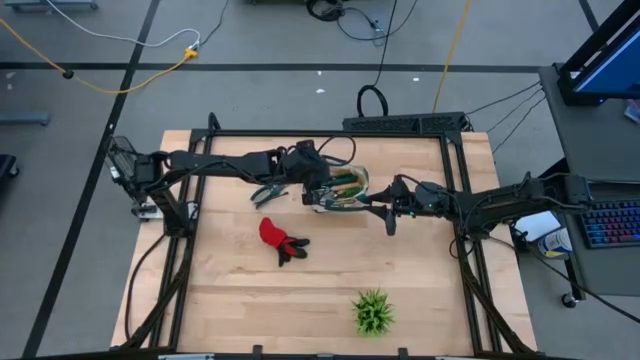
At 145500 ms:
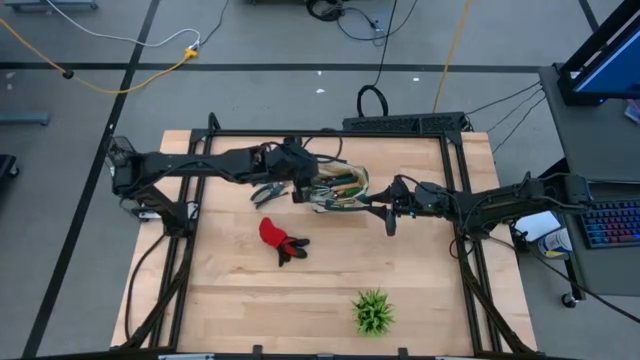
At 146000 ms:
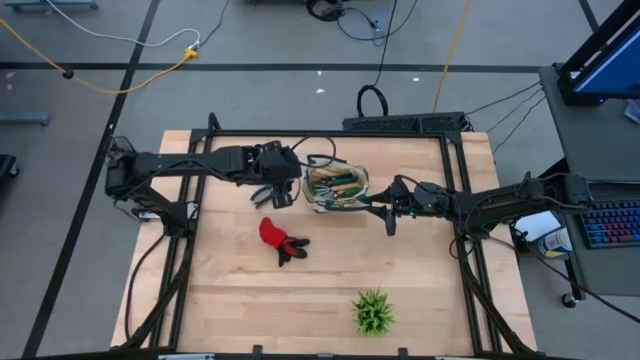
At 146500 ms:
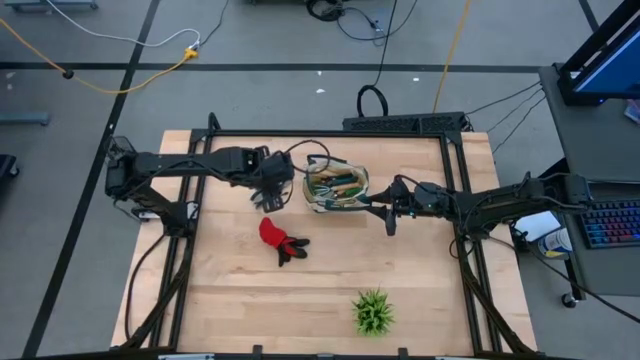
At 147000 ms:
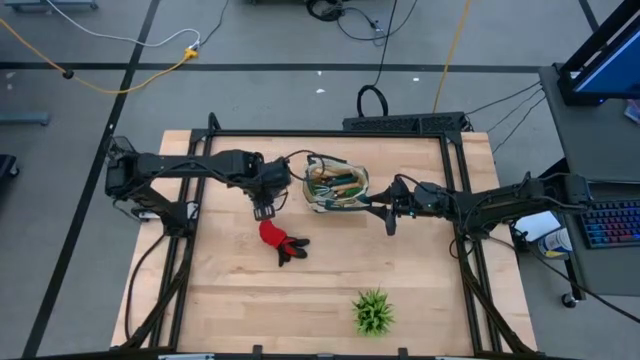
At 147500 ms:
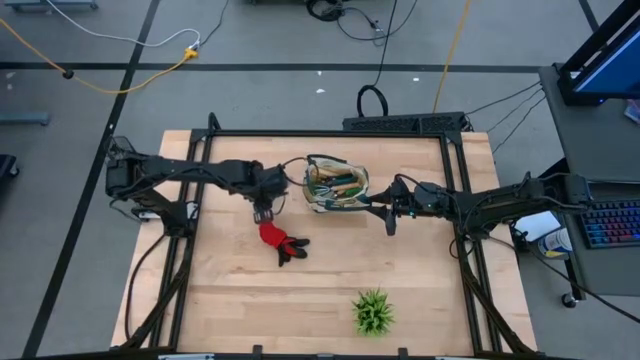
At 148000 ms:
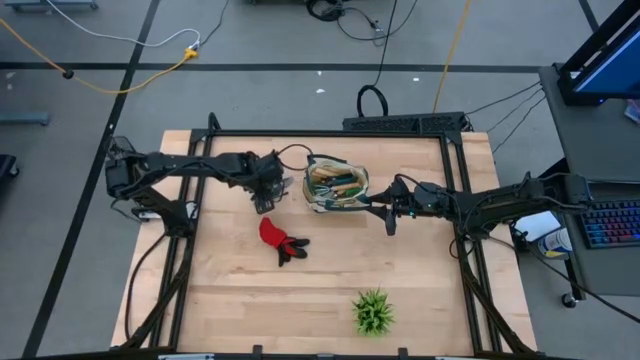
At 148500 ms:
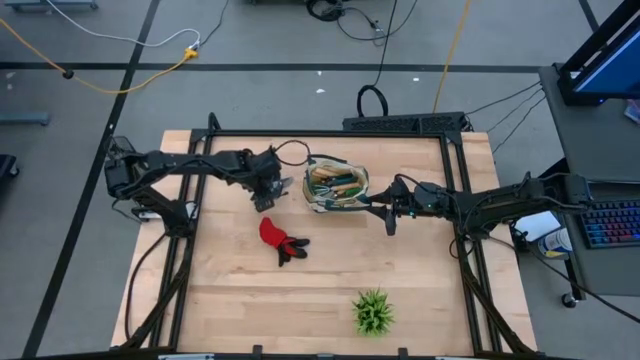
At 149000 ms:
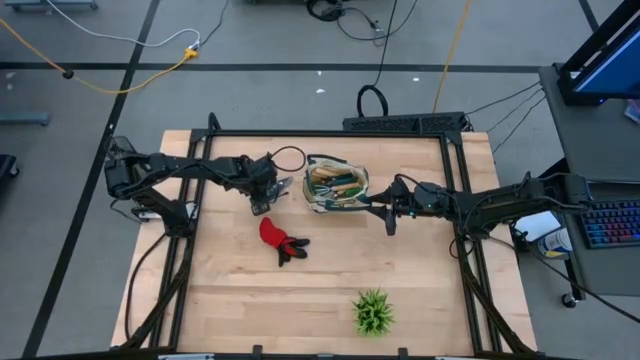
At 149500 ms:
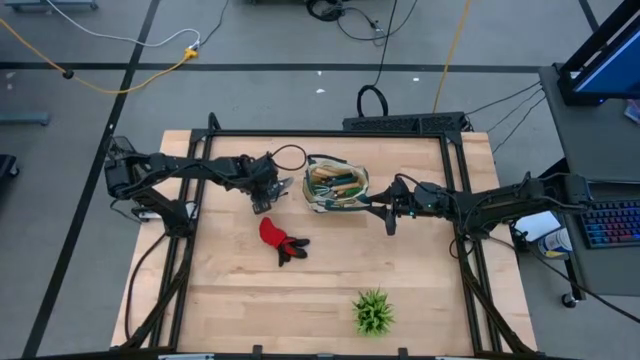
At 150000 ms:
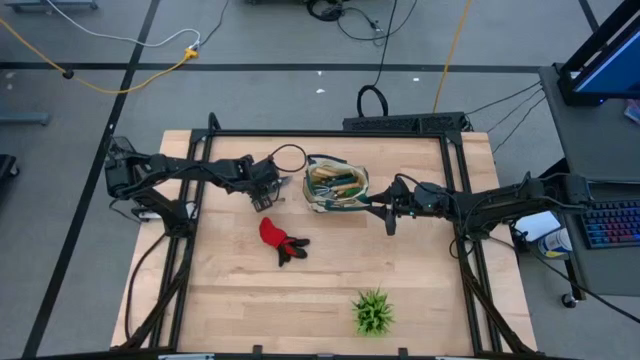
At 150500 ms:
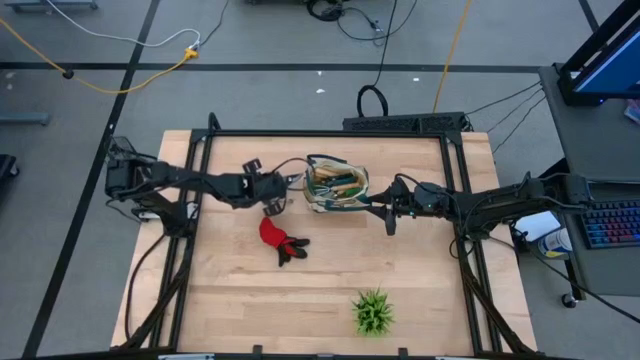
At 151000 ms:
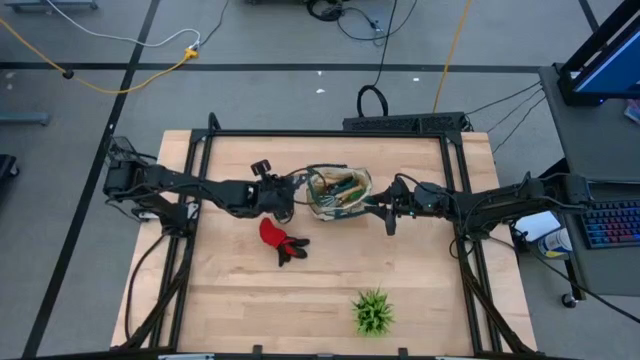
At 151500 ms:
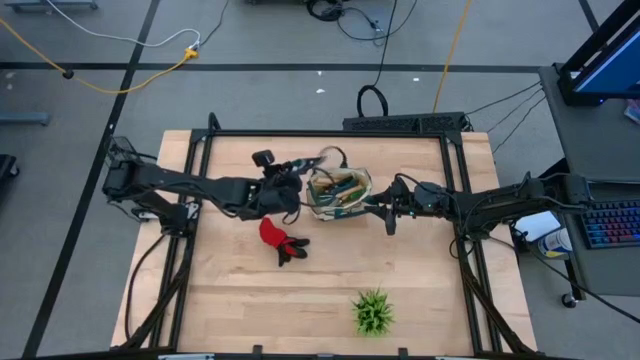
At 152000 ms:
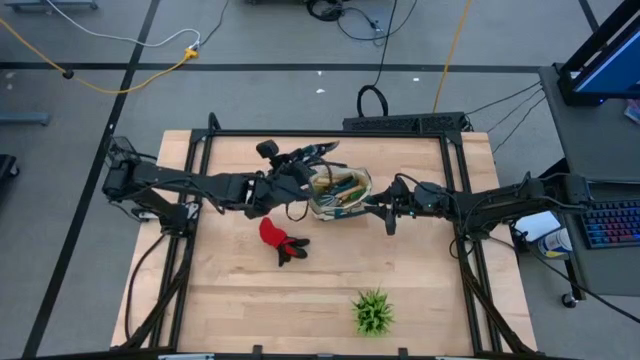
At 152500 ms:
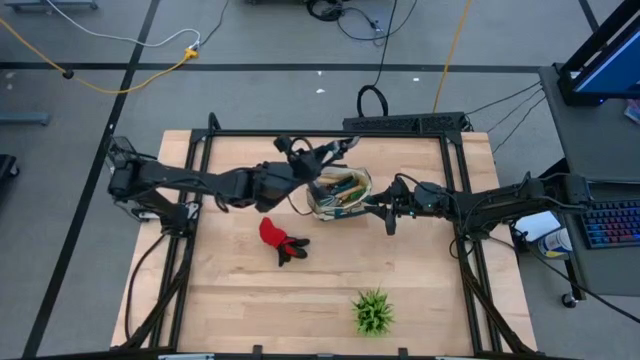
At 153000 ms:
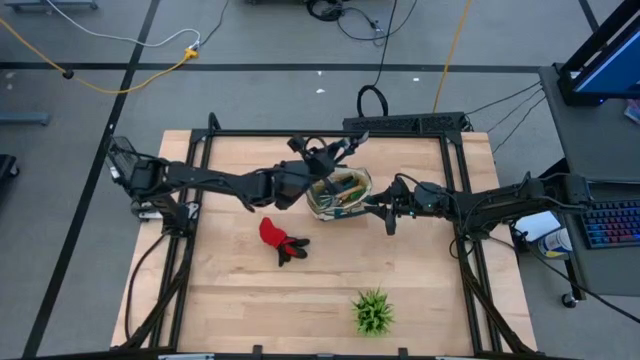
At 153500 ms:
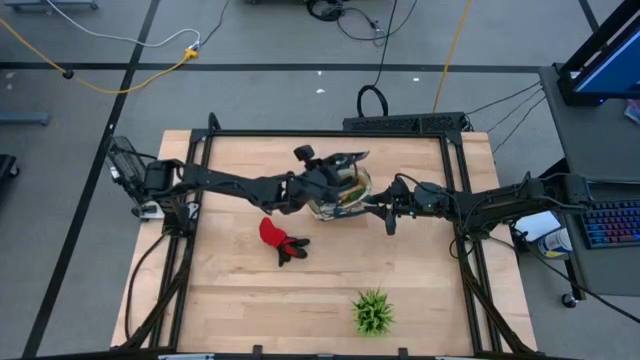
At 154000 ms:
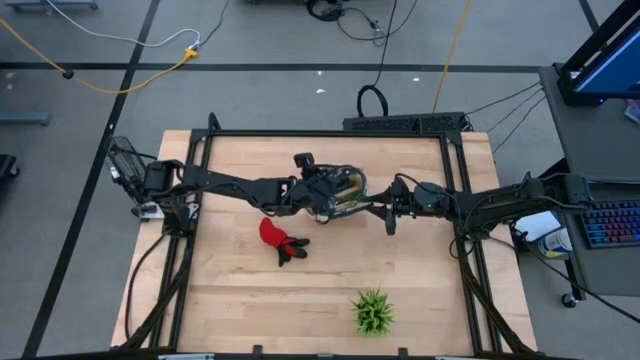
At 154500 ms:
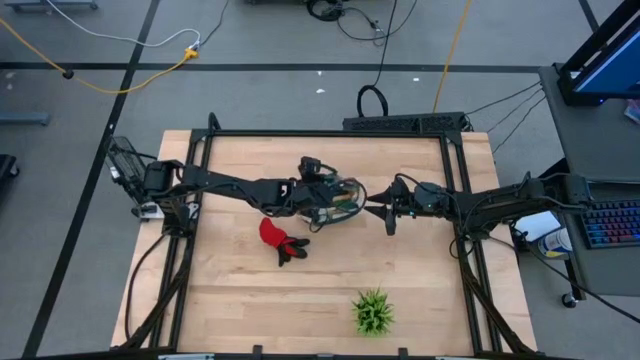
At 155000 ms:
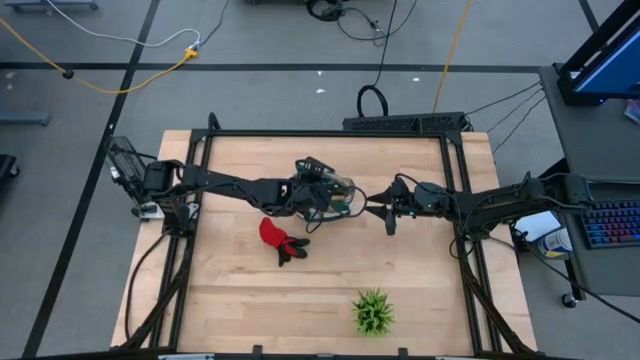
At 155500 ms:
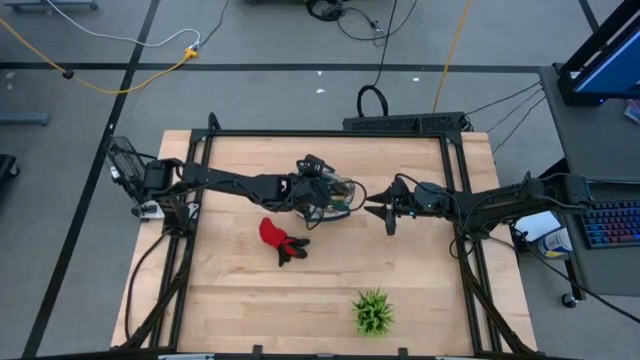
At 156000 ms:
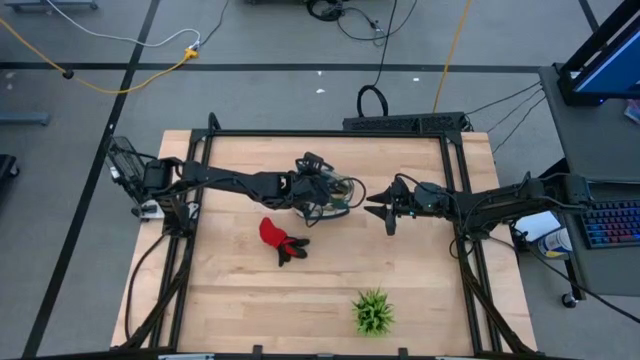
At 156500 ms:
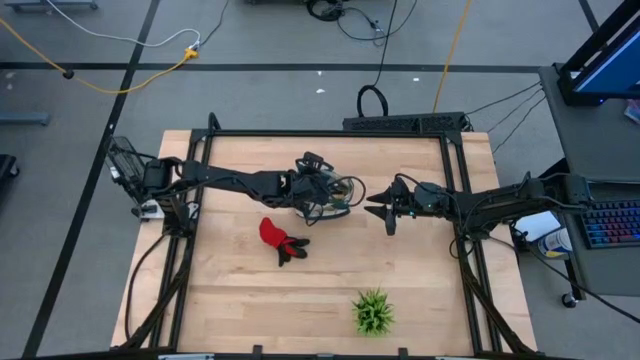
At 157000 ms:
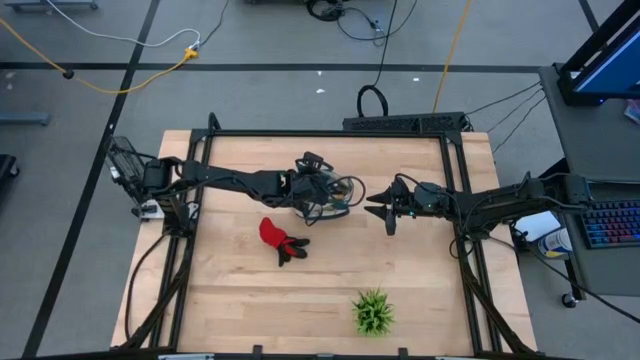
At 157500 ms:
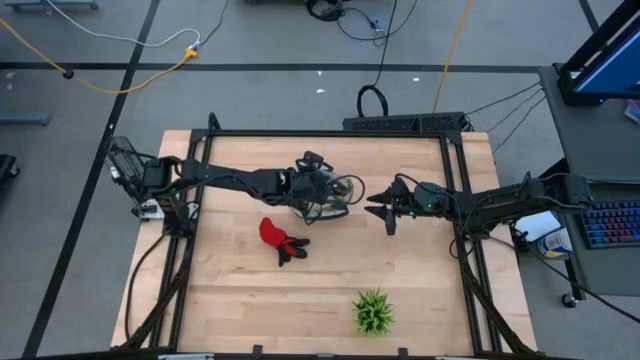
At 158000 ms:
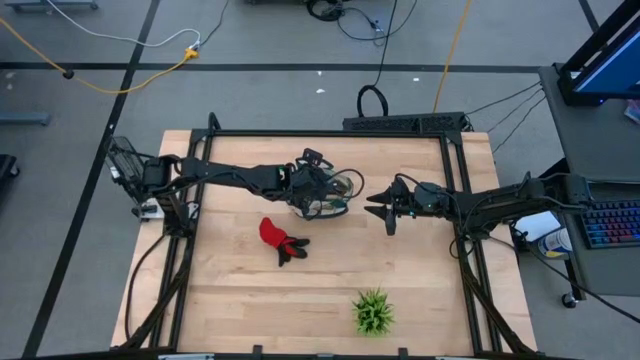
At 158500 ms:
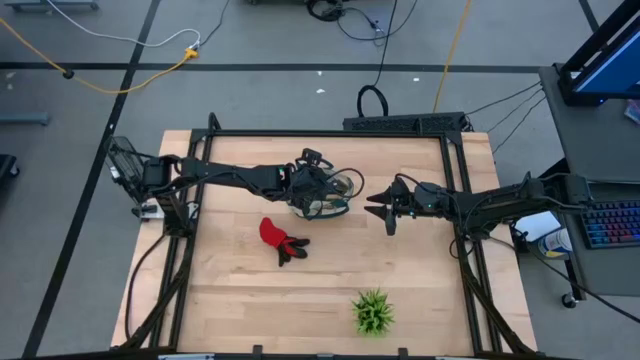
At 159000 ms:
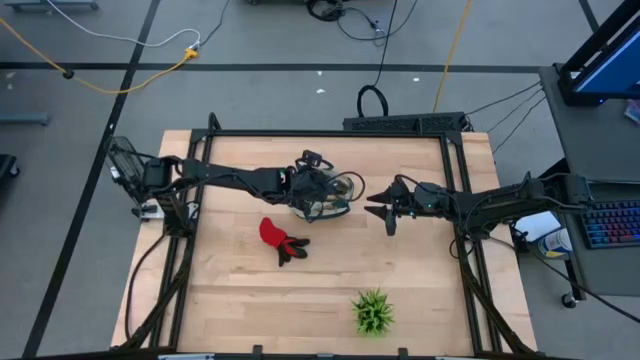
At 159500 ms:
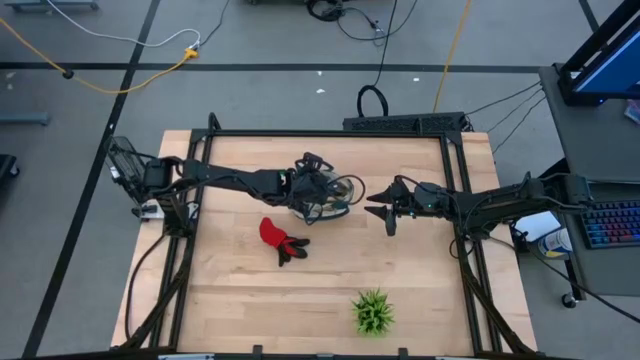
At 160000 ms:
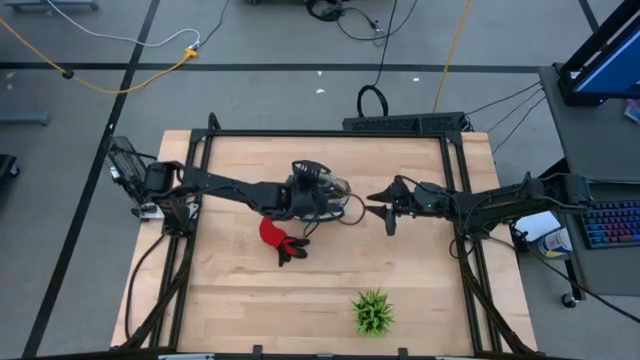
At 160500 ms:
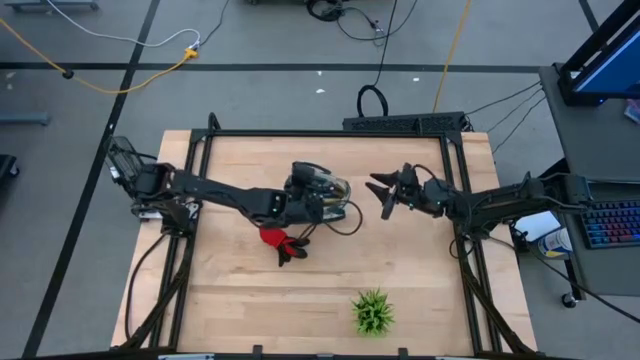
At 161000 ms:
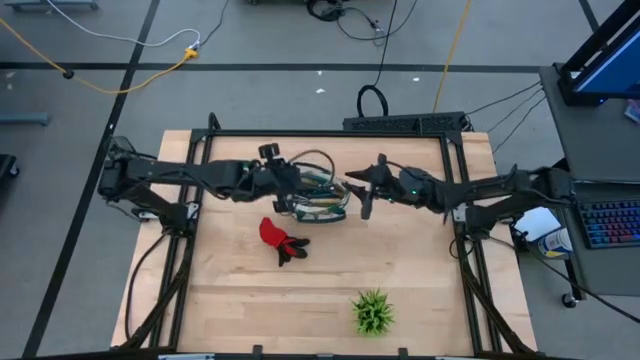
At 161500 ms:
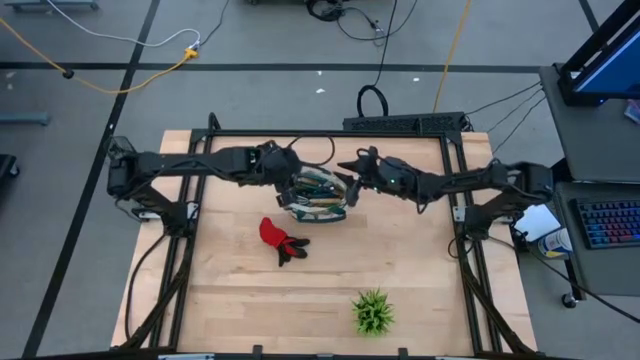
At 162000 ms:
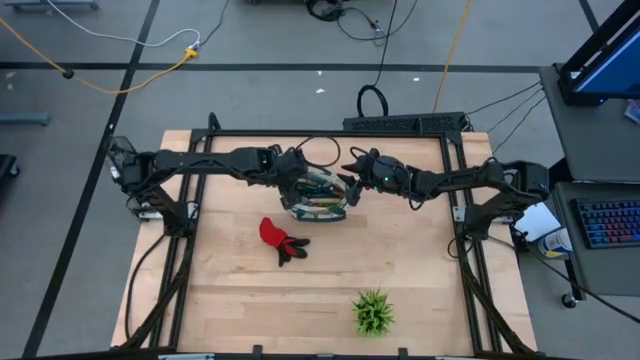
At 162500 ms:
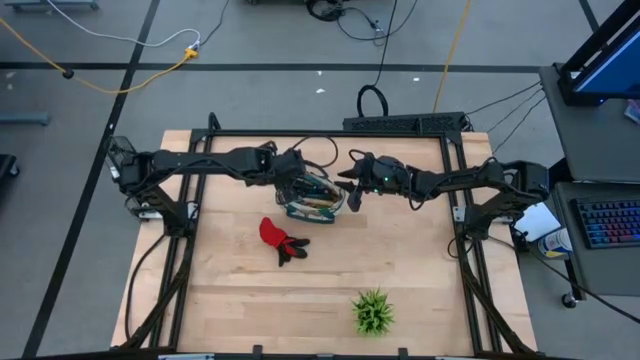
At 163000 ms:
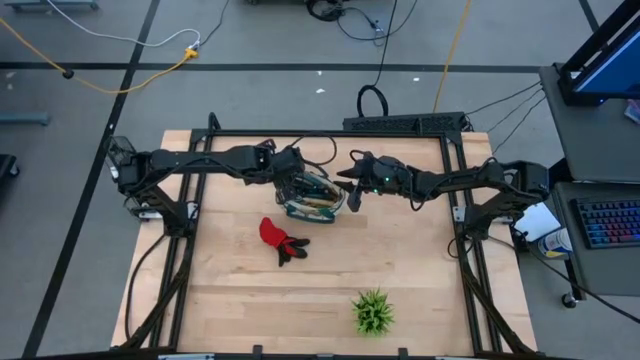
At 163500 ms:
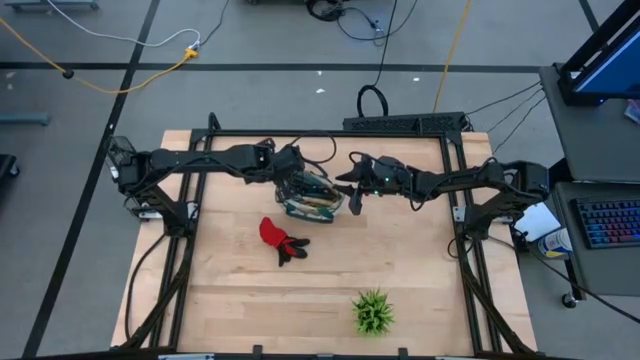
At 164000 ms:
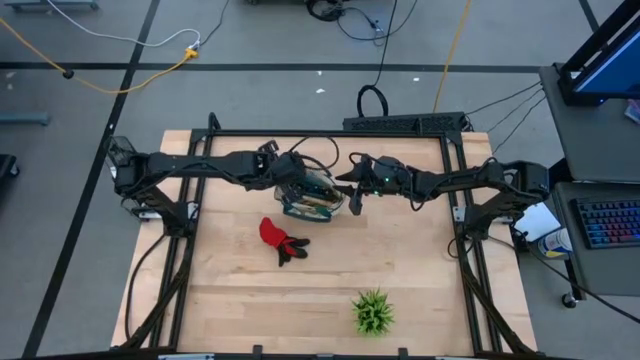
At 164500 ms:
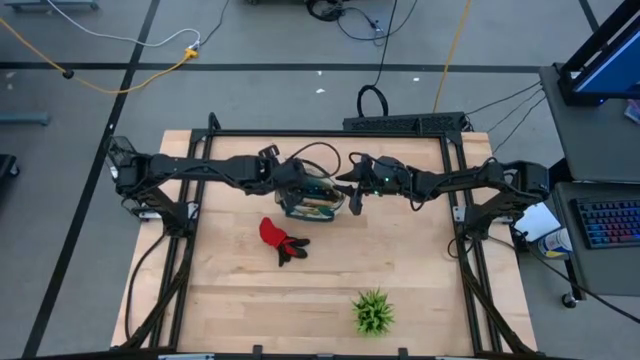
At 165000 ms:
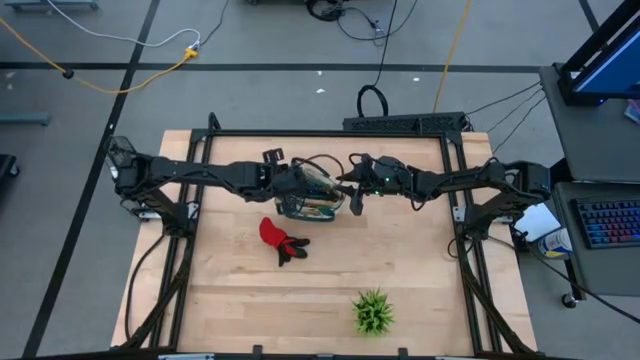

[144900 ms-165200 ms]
Task: Pick & Place Garden tools in Gardening bag
Put the blue fruit pruner into the gardening bag

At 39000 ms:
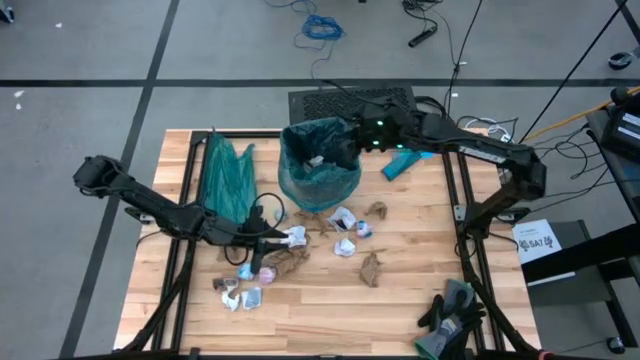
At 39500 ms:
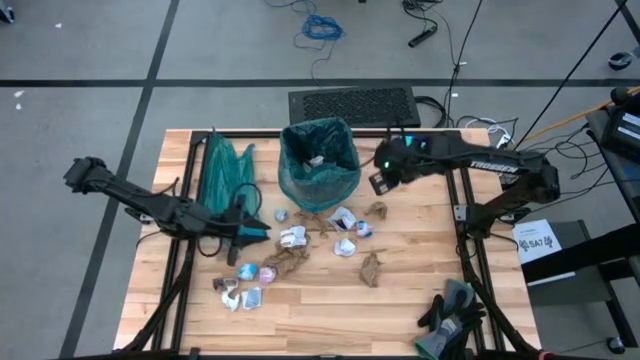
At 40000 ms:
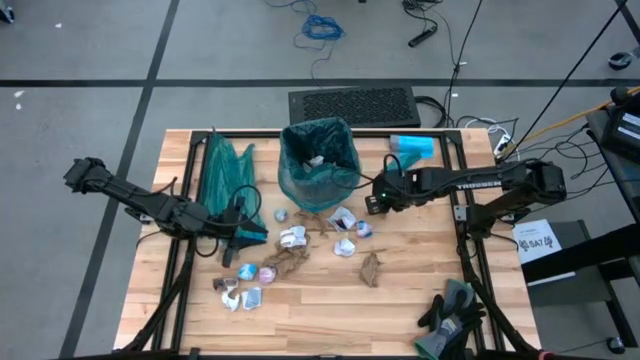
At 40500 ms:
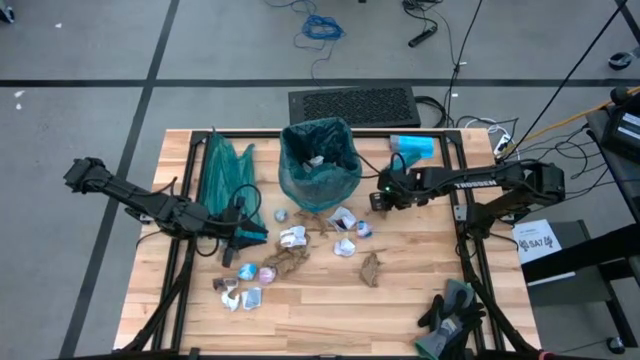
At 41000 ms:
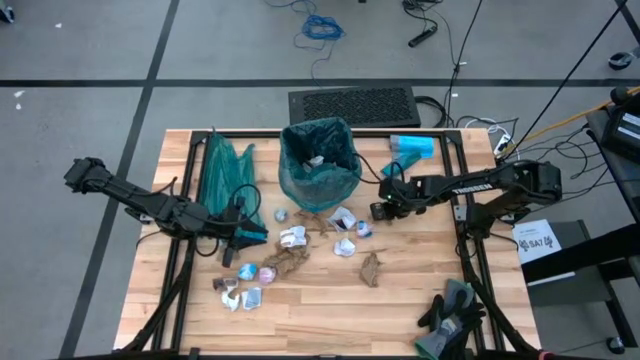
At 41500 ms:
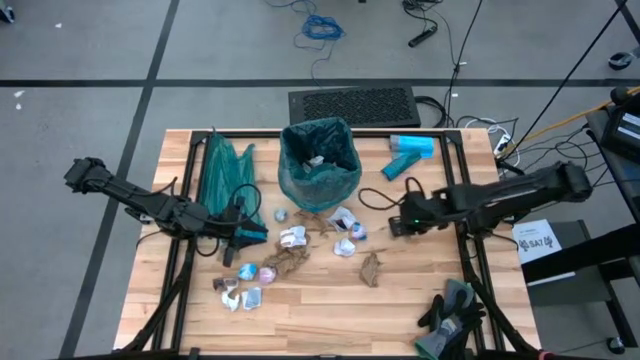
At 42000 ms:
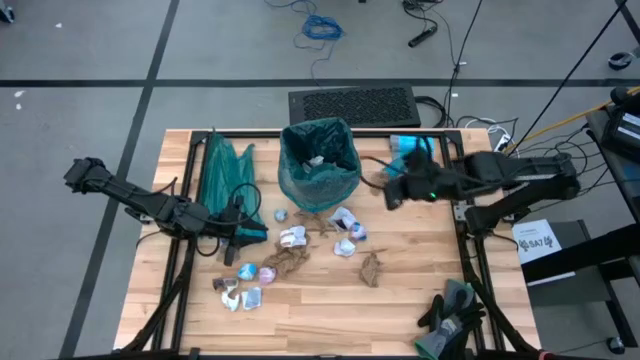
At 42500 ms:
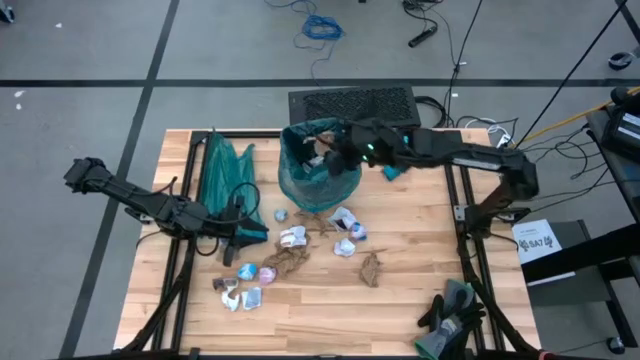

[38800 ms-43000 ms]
Task: place trash/remove bag and relplace
Put the brown napkin into the blue trash bag inside the black trash bin
